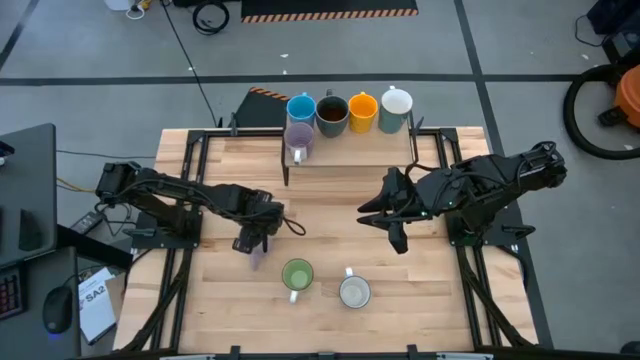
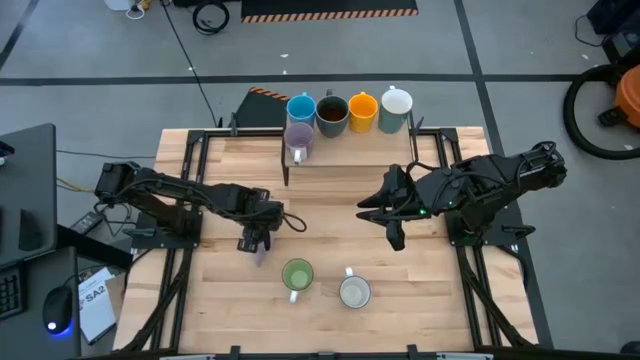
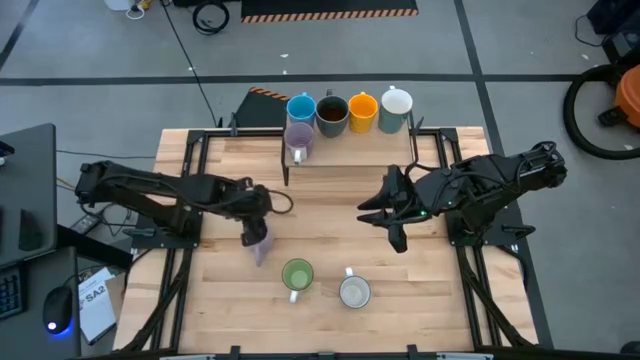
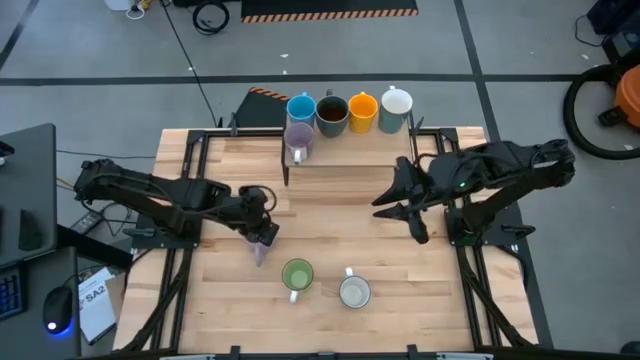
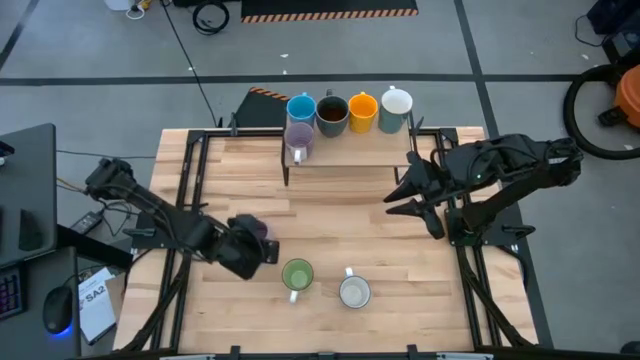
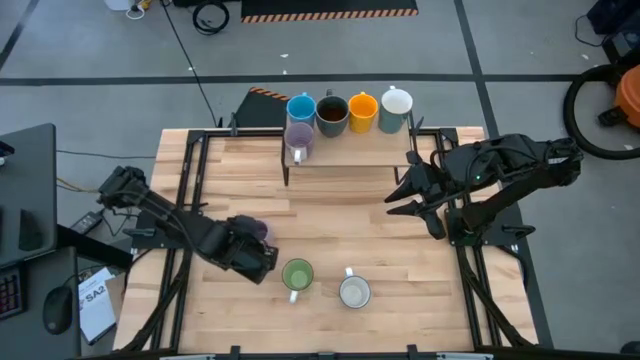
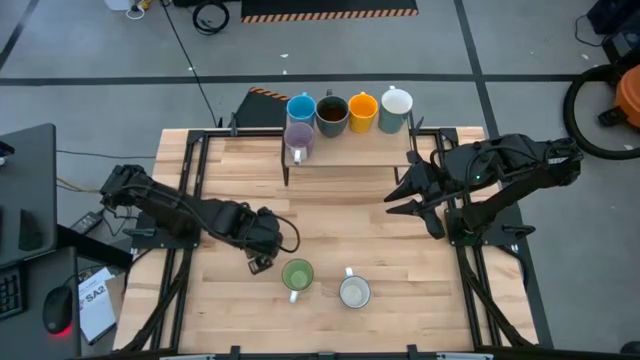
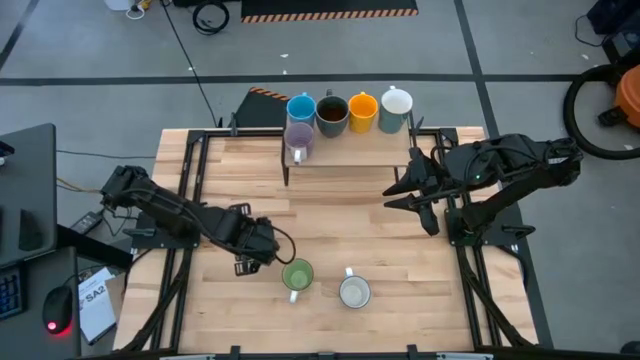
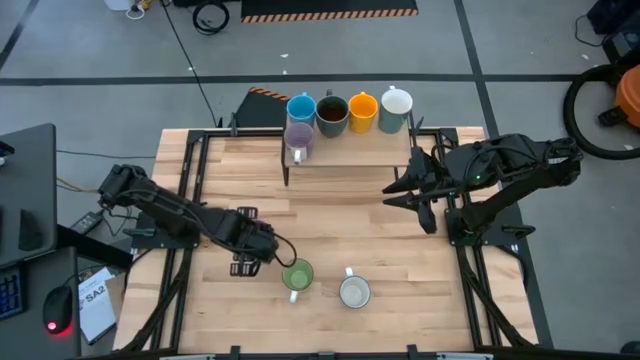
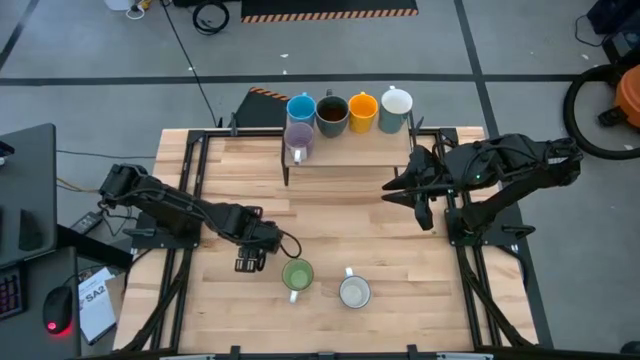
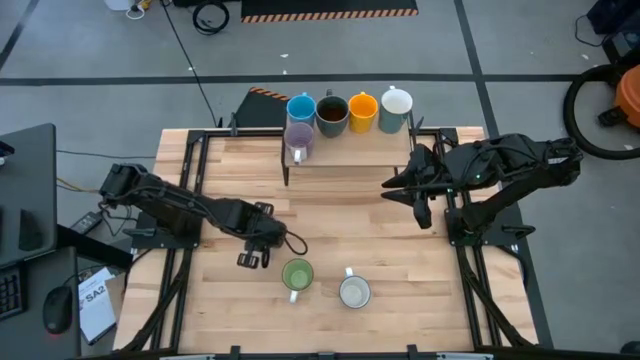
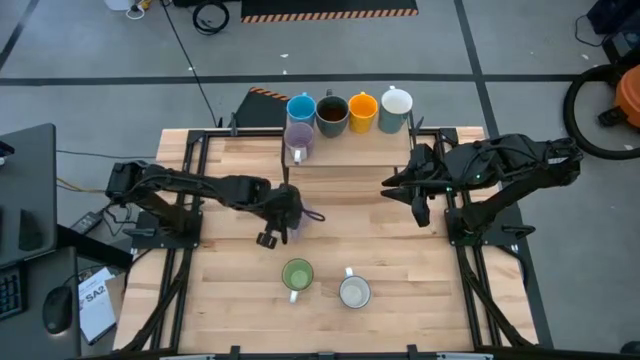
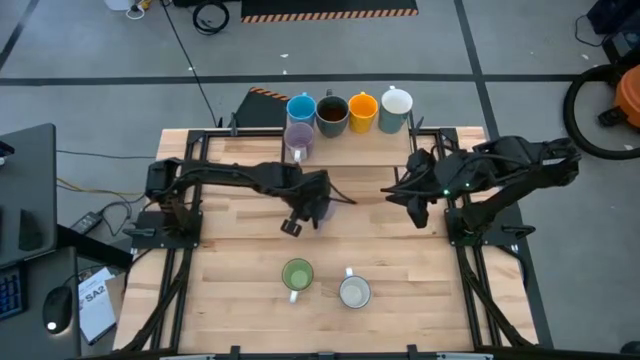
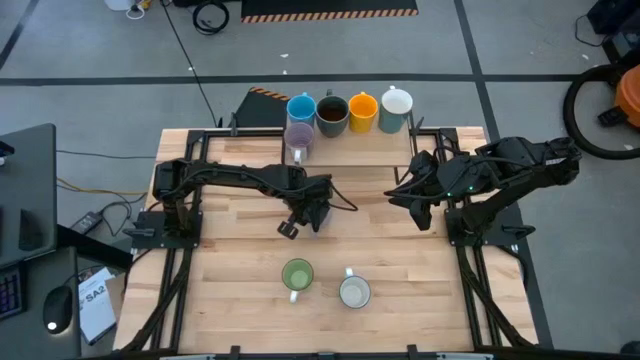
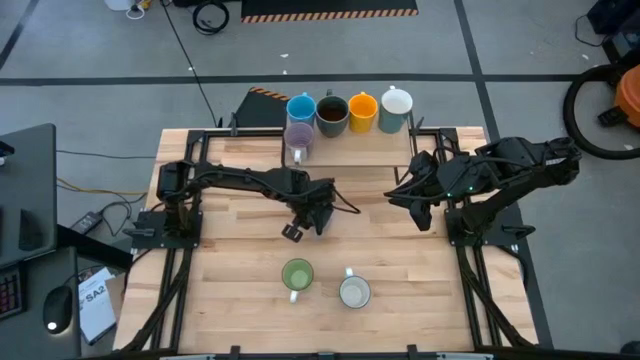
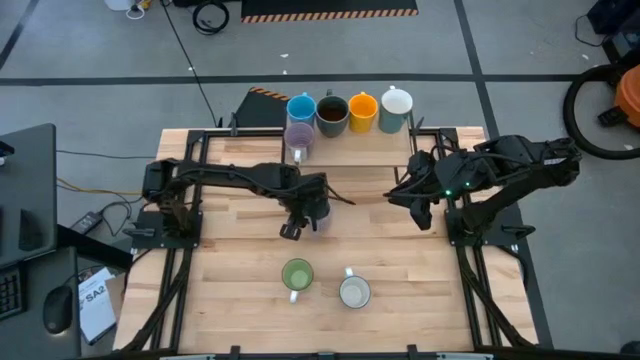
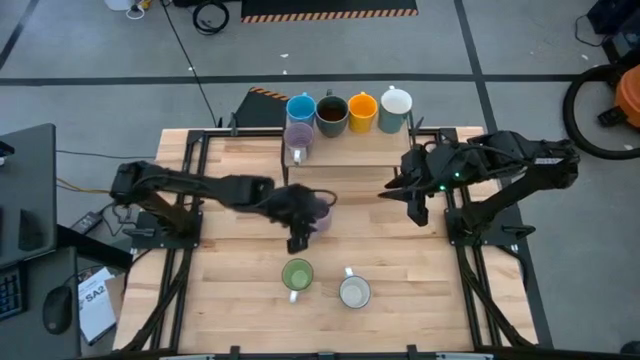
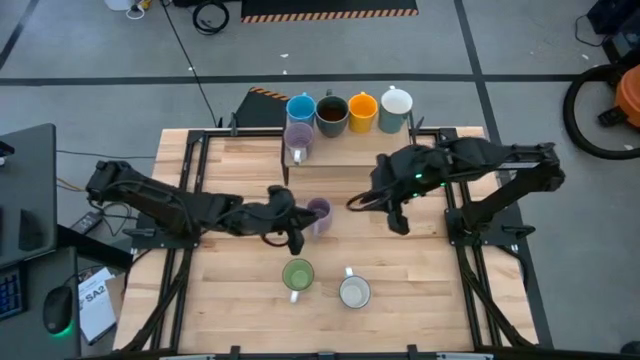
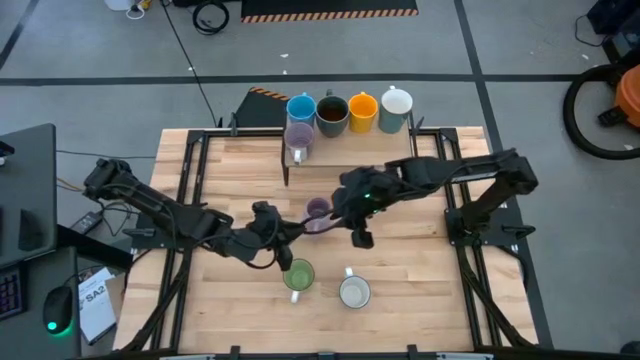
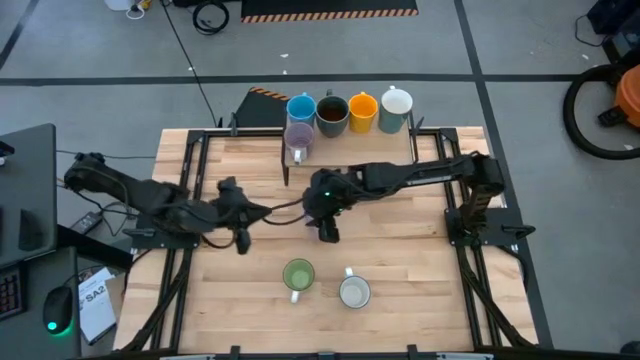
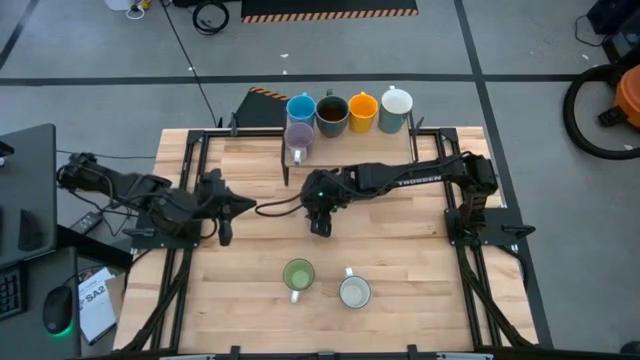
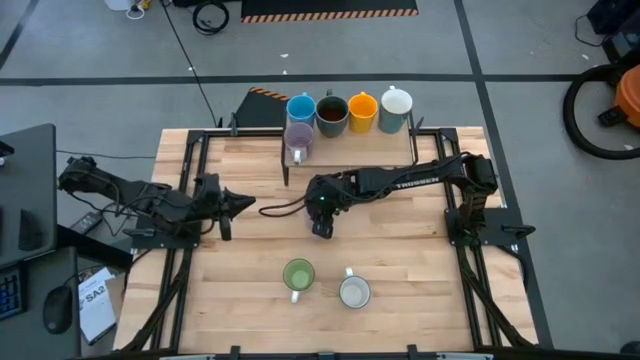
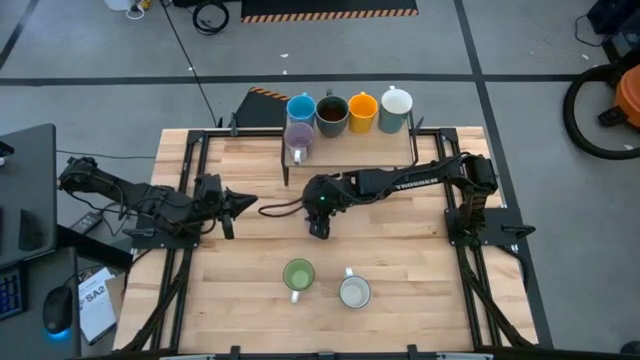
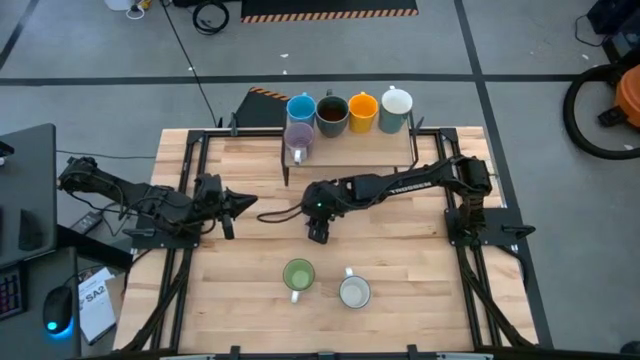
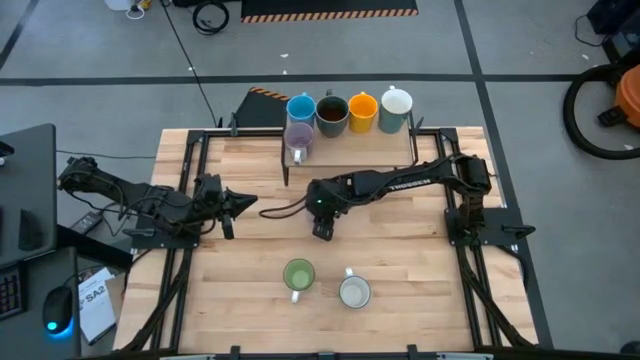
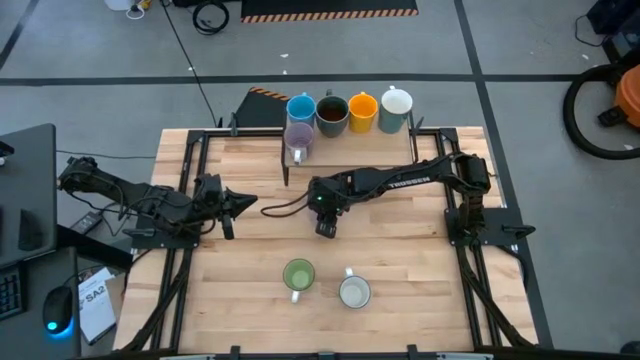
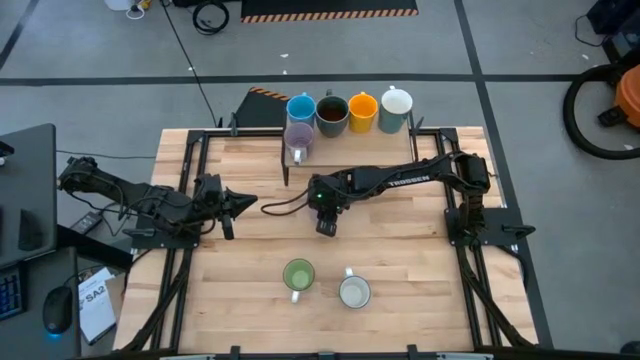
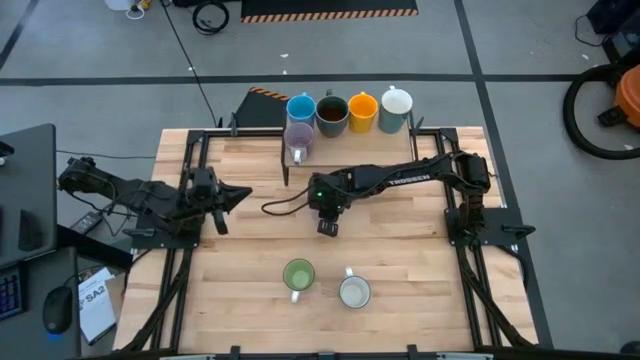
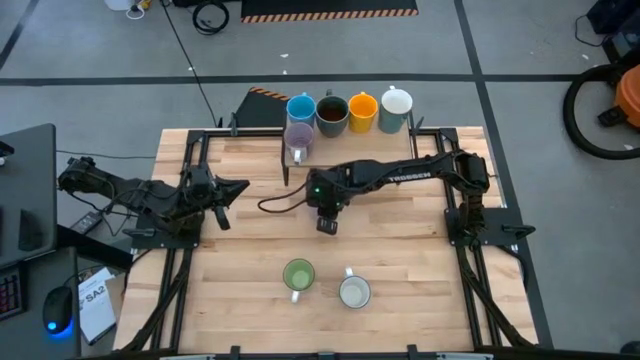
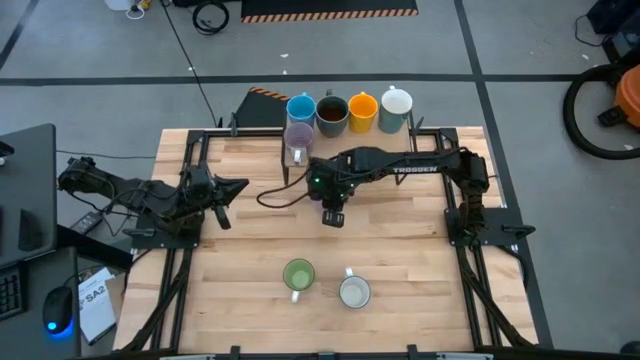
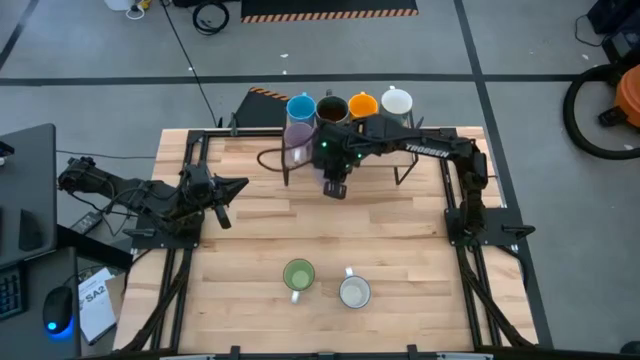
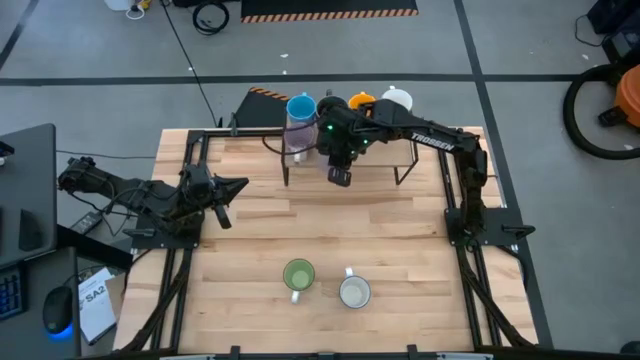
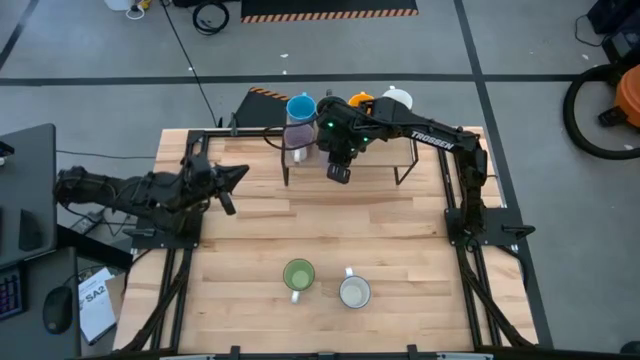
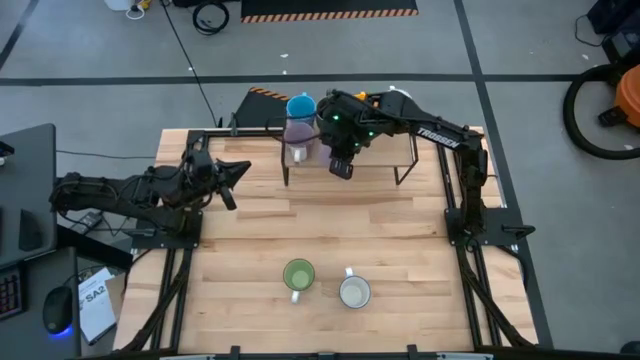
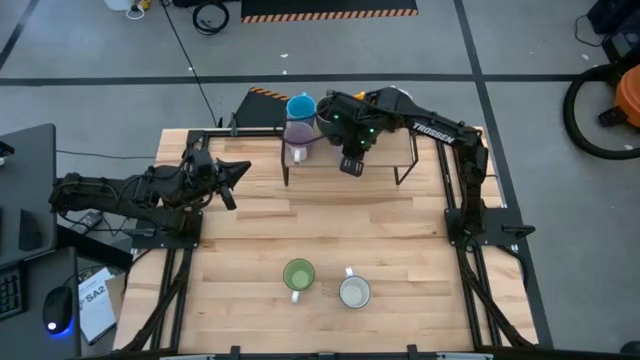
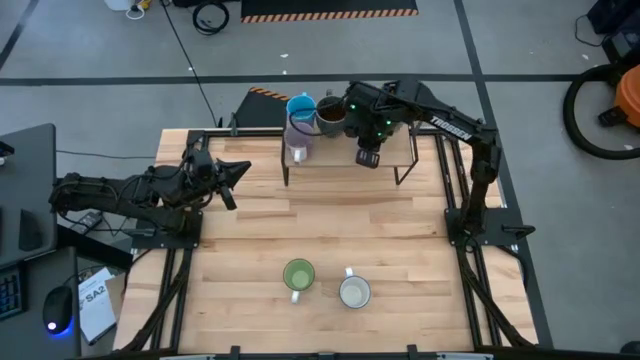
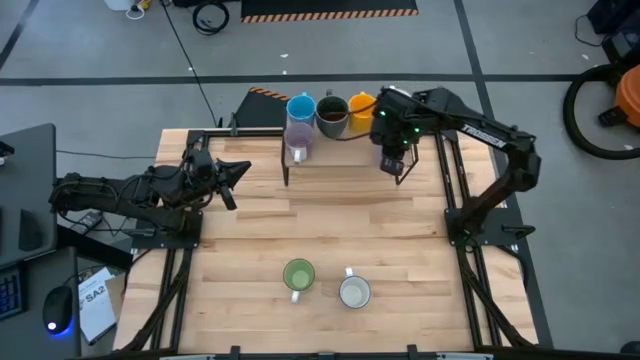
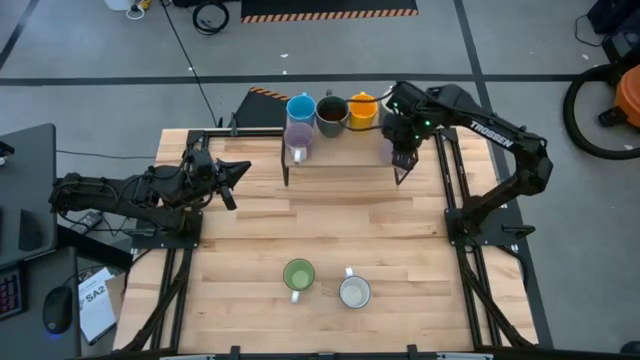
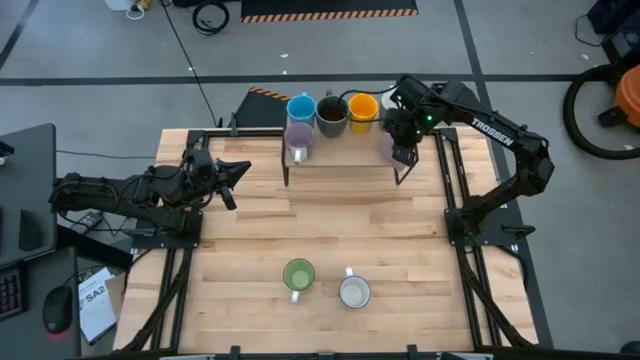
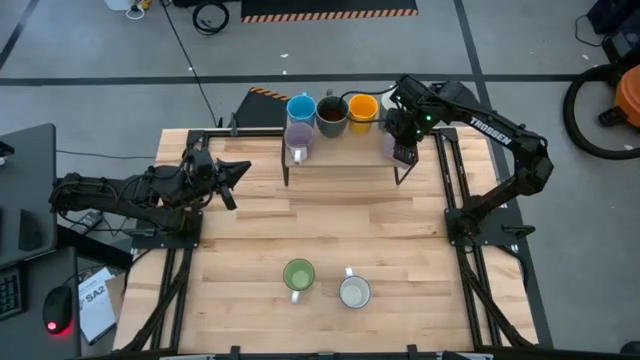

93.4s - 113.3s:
Task: Place coffee mugs
Put the violet mug on the shelf

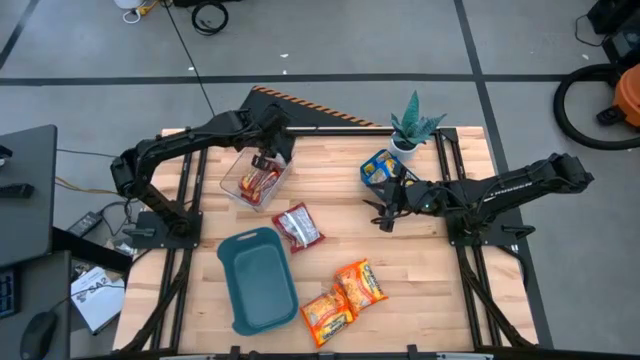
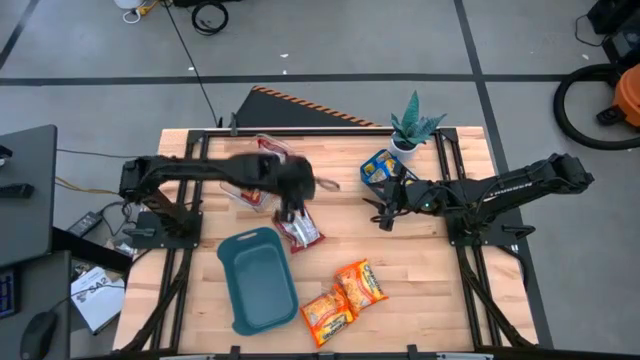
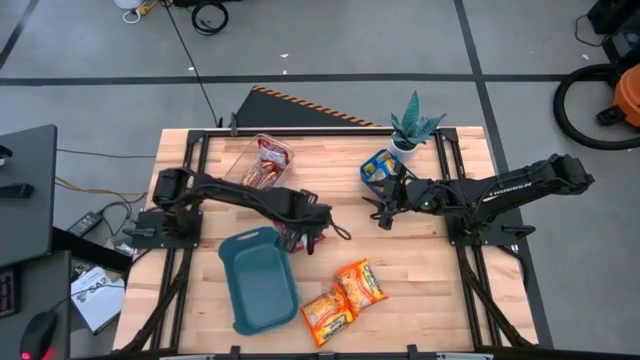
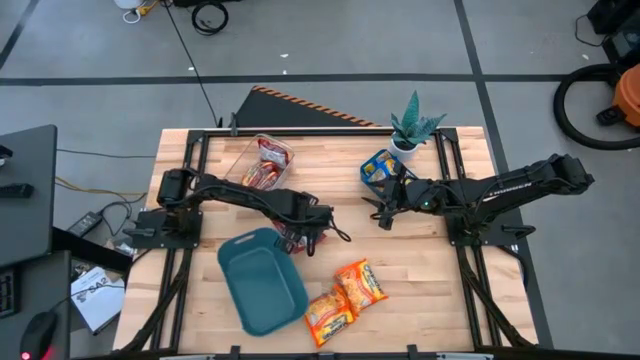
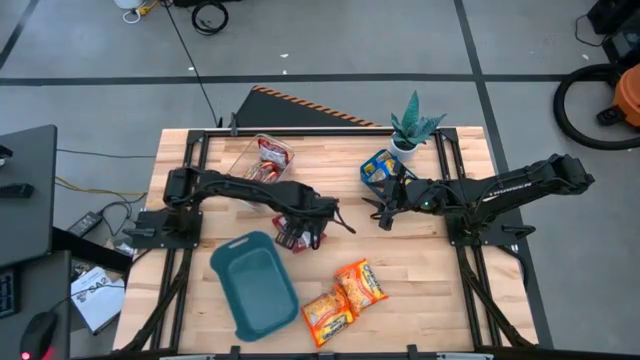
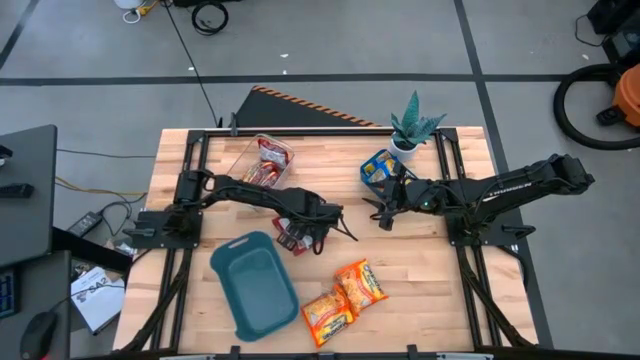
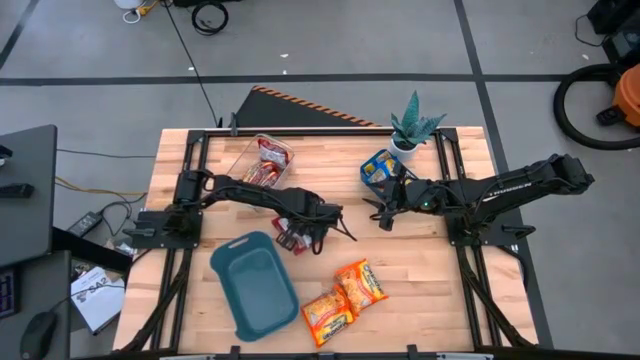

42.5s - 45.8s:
Task: Sort Maruchan noodles
Put the red noodle pack into the transparent bin
